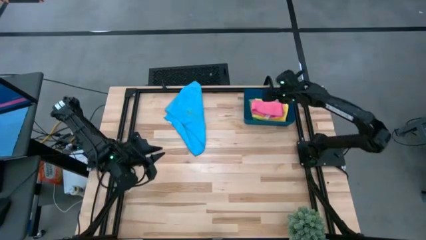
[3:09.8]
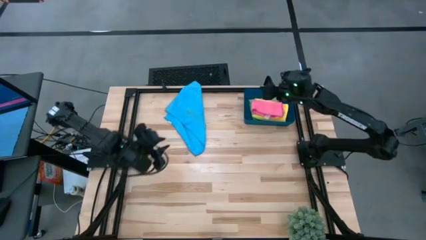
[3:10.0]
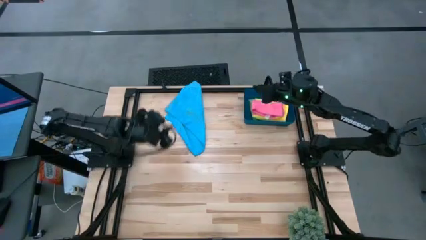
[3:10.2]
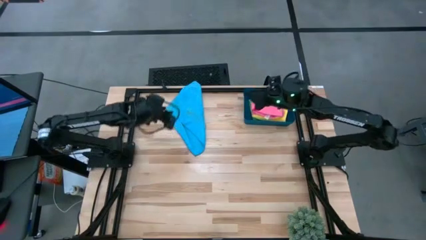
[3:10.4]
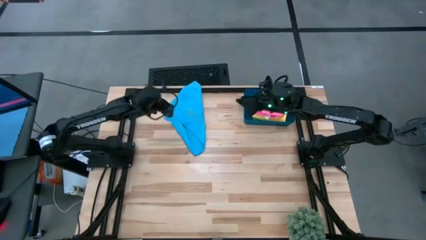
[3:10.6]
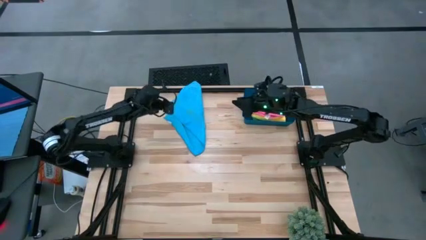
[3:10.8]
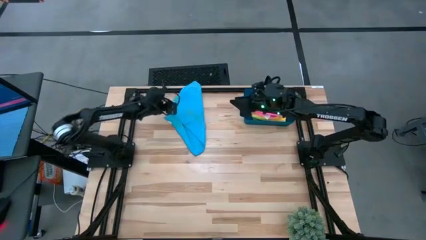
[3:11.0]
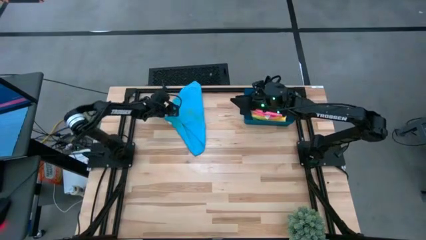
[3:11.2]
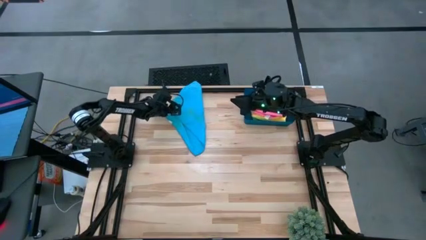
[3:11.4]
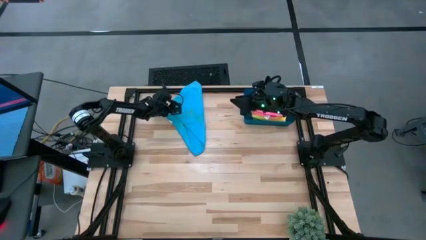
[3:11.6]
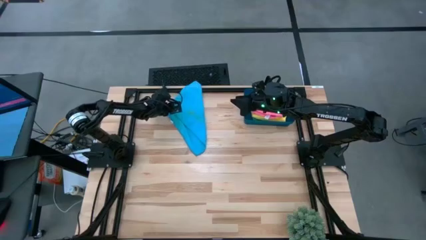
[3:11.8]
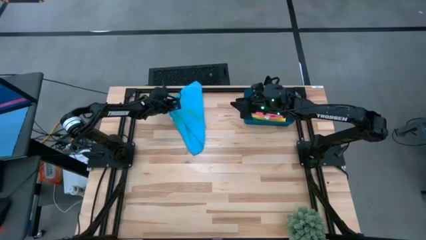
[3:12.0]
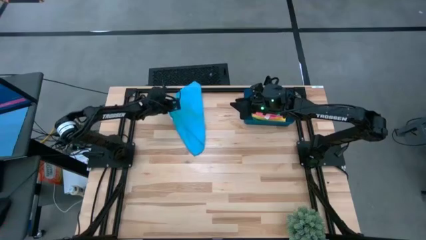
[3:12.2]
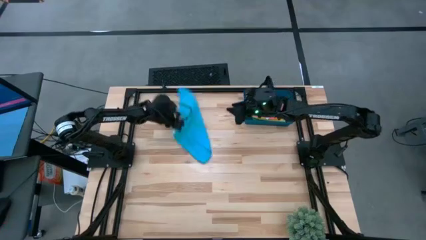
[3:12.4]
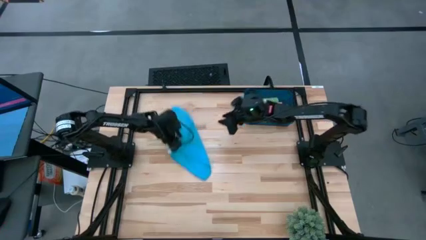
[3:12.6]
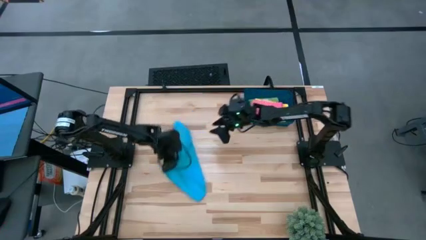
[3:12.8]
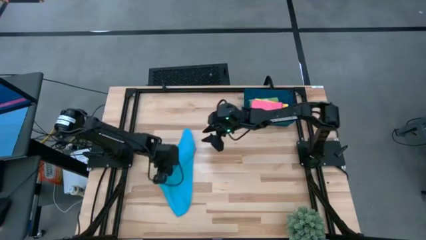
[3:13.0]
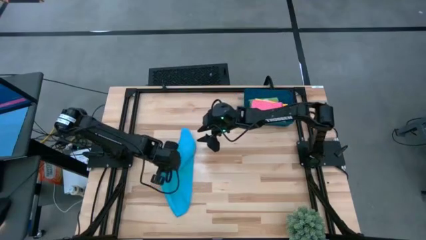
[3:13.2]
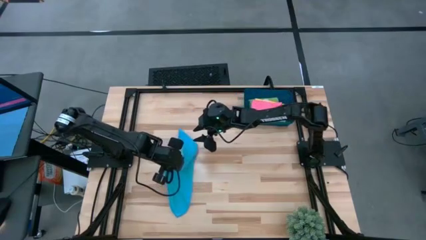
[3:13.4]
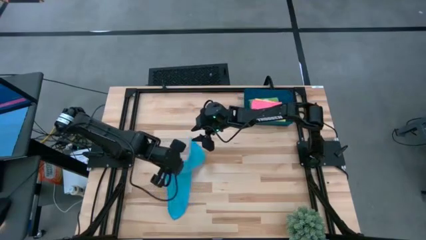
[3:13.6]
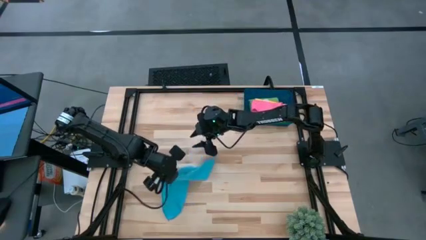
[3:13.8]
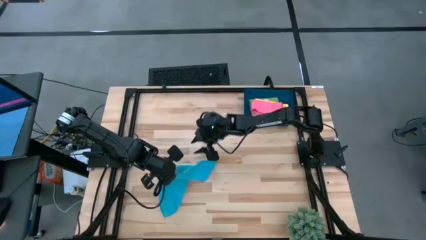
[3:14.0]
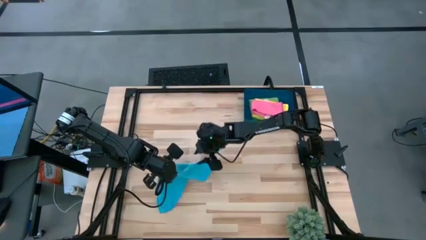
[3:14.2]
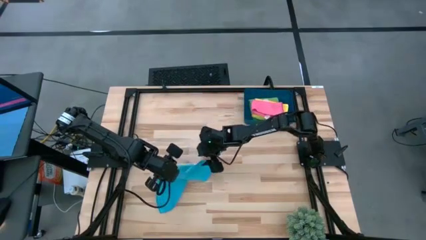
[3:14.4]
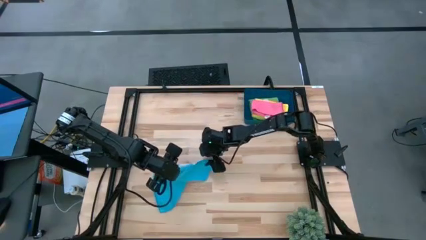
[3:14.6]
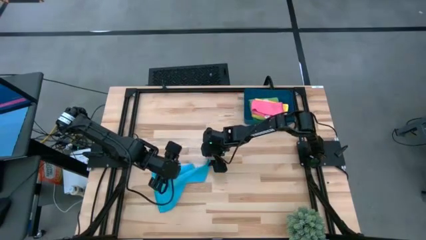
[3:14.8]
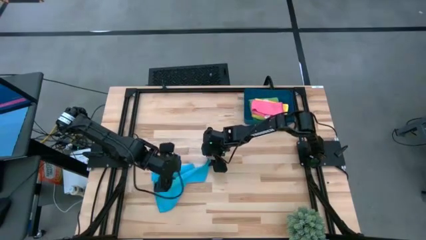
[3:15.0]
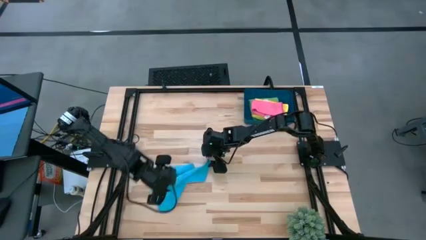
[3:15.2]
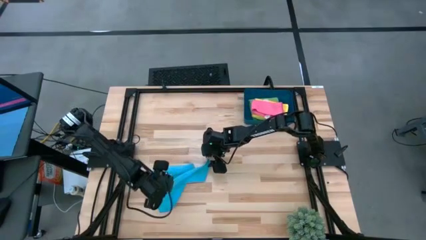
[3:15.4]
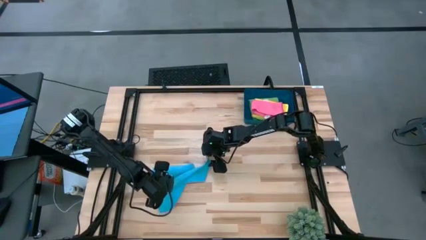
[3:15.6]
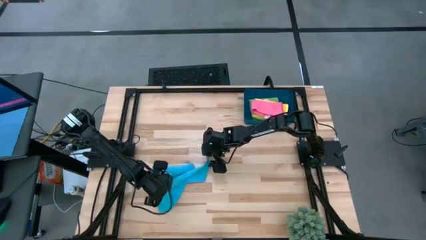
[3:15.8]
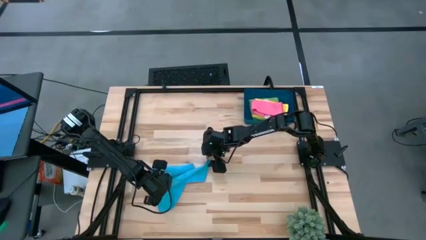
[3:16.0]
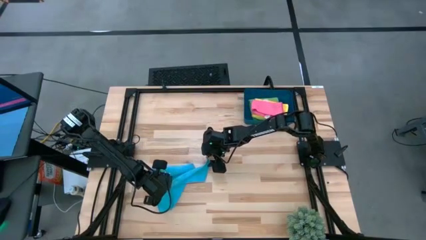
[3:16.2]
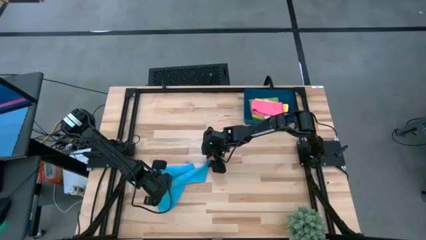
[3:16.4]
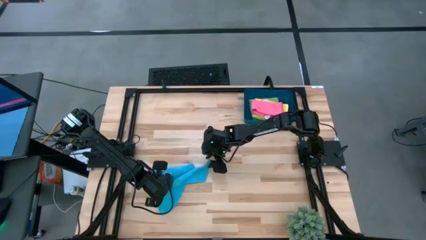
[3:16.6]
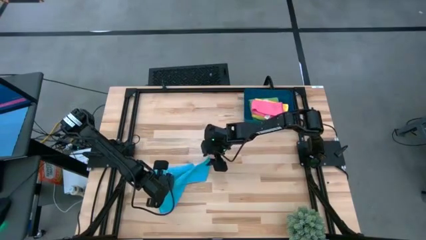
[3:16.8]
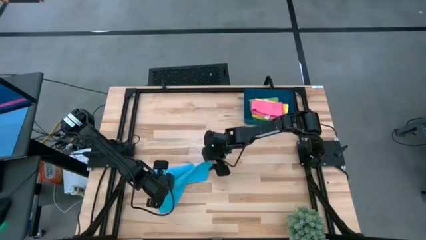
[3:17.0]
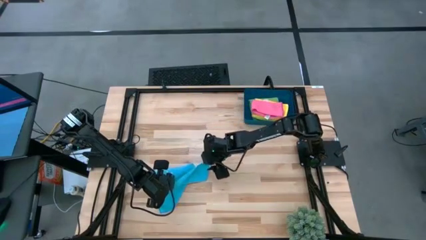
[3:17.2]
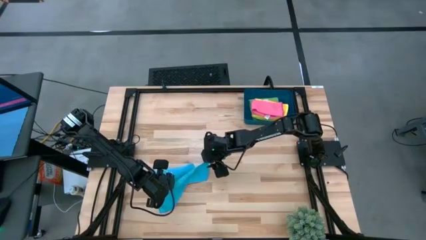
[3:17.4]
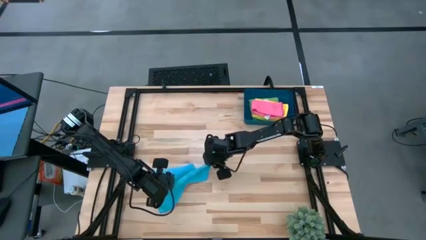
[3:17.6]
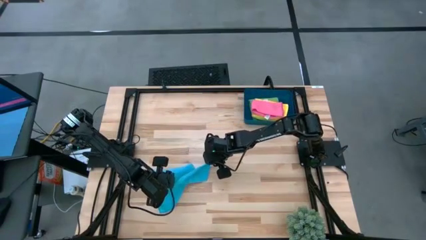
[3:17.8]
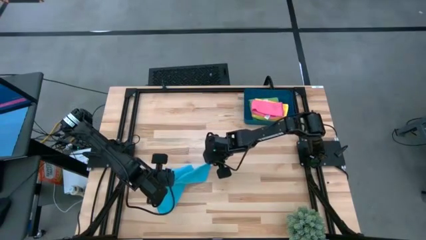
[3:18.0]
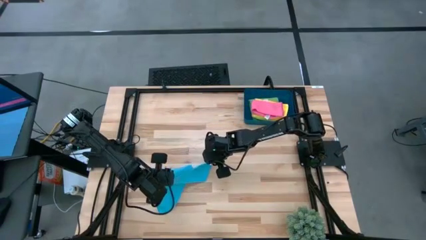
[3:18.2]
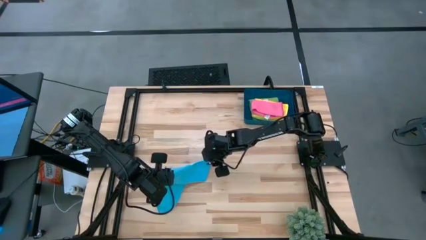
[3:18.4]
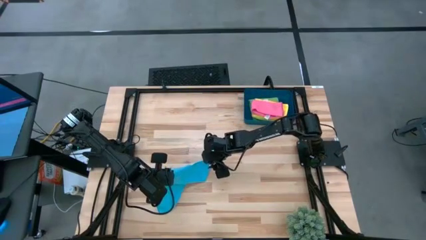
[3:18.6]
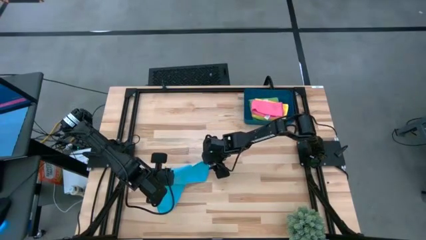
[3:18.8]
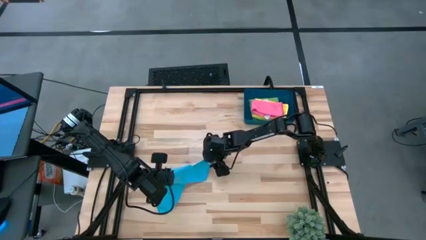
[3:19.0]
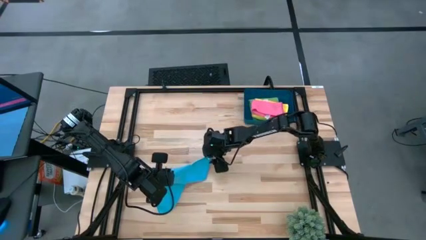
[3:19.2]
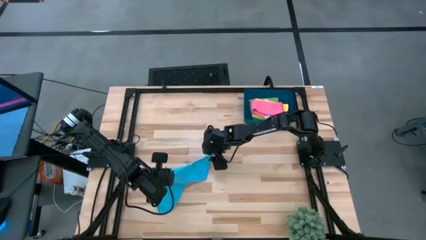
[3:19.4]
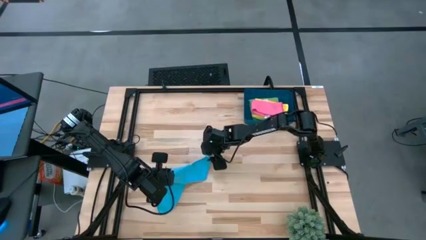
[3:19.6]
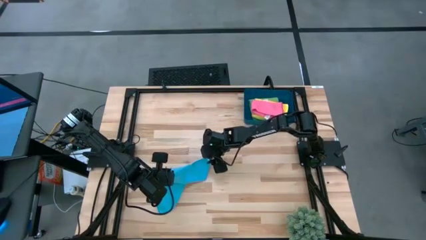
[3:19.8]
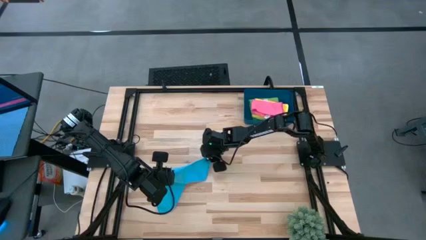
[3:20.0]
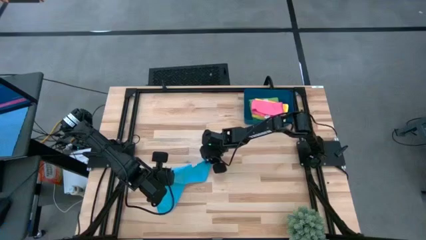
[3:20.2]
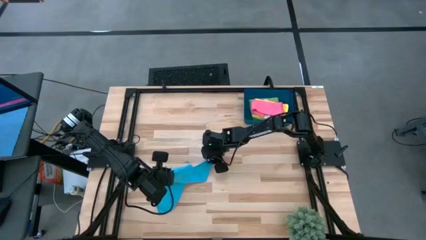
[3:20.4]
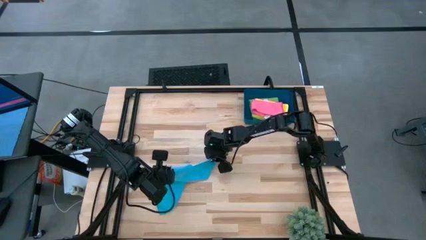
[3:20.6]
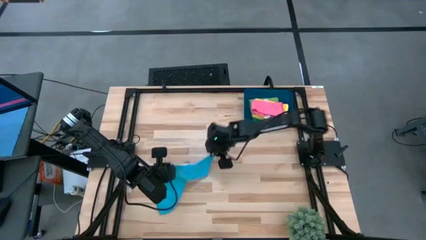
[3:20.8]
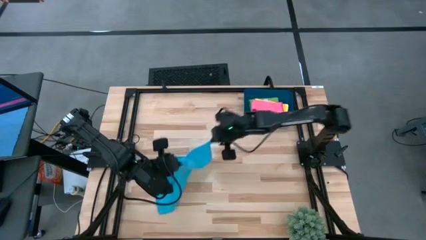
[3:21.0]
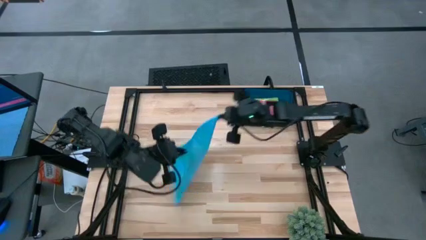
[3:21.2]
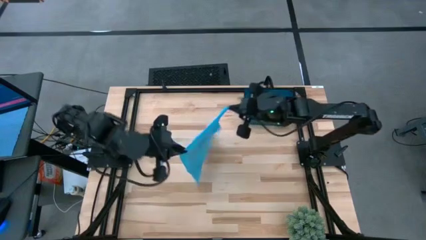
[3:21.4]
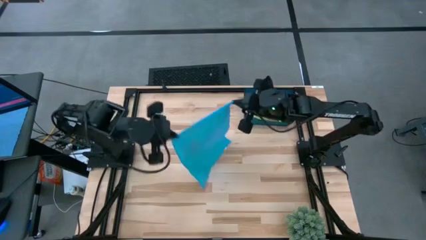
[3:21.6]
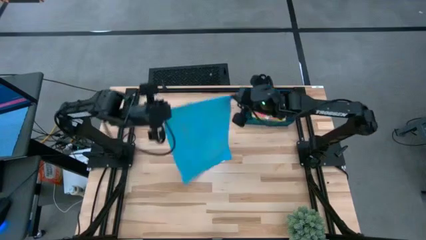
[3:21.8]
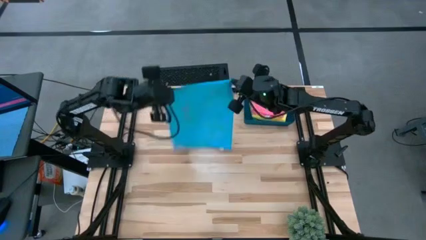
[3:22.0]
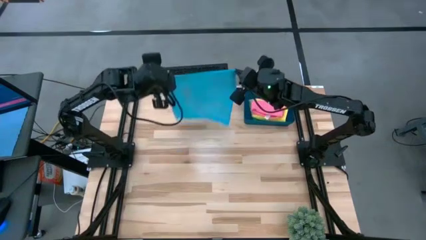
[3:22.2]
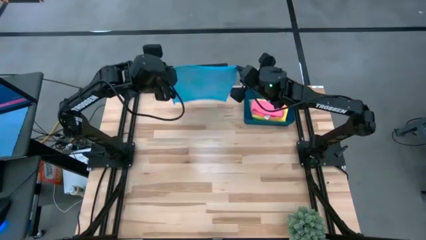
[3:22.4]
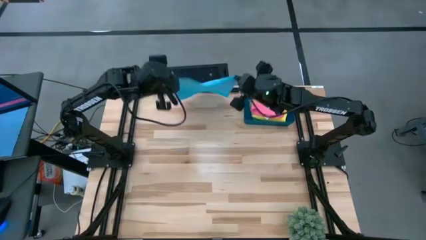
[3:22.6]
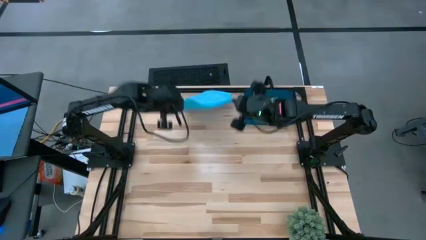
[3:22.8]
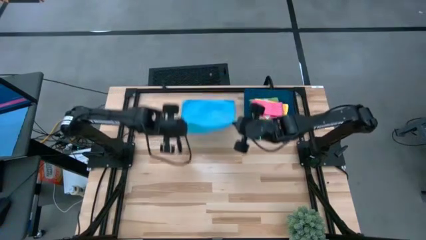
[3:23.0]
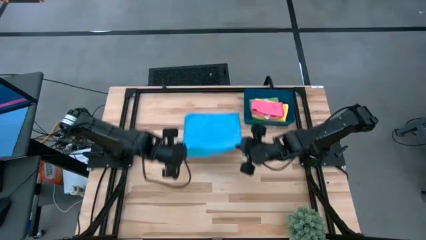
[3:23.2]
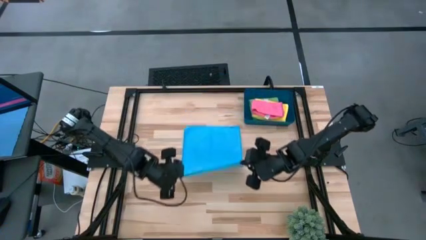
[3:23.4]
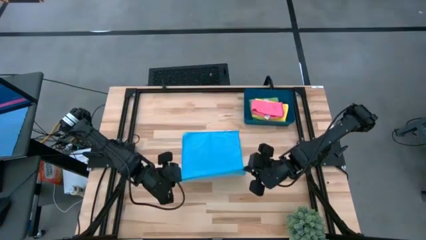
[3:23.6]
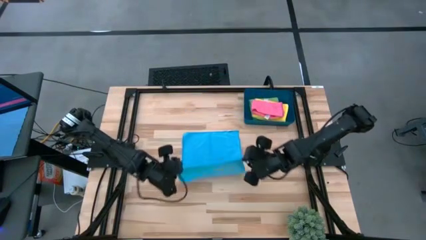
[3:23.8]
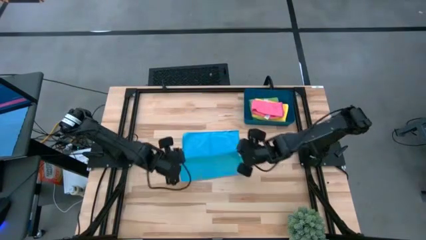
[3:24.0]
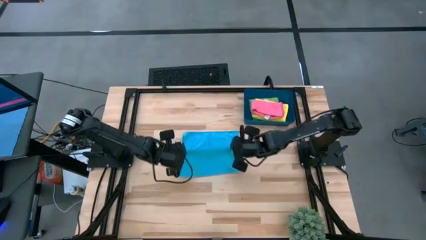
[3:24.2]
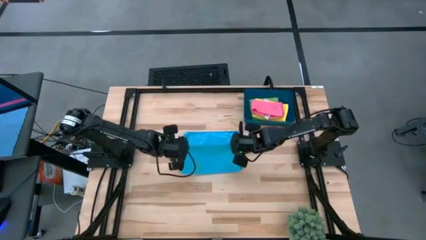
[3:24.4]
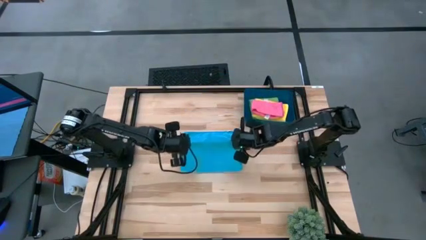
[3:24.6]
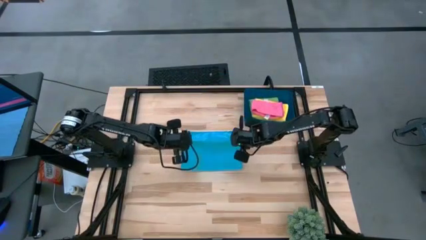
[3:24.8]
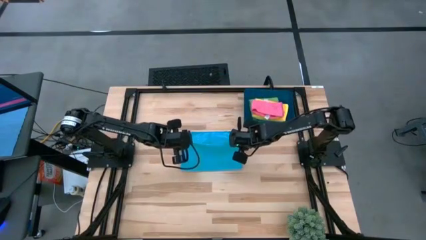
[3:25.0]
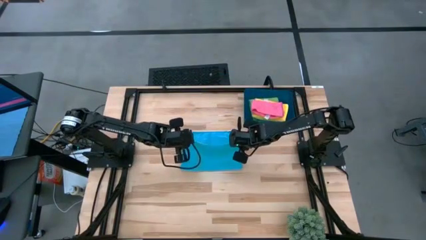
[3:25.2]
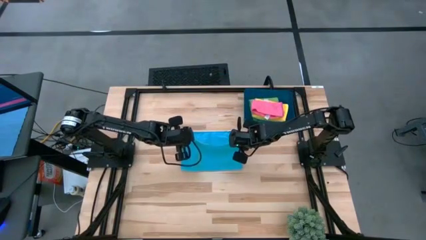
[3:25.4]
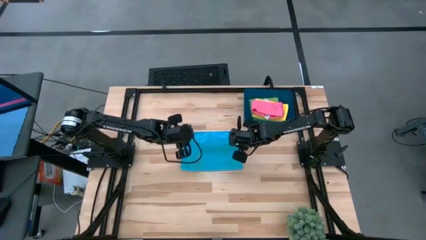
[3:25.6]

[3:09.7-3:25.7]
Task: Fold microfiber towels
Fold the light blue microfiber towel
